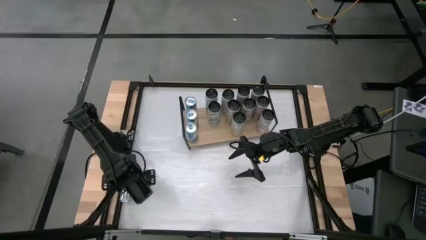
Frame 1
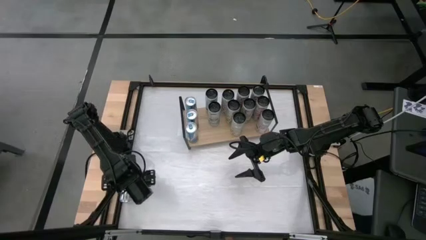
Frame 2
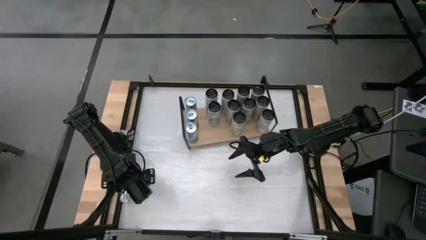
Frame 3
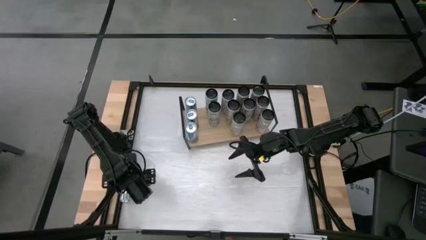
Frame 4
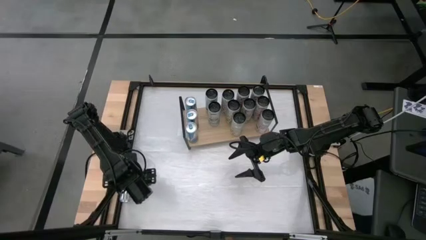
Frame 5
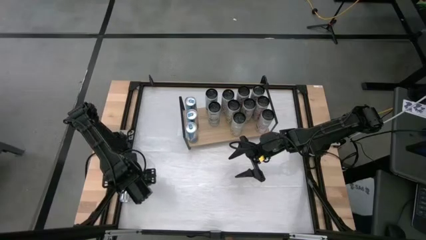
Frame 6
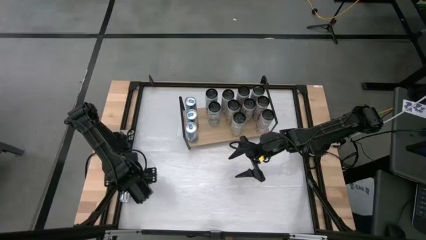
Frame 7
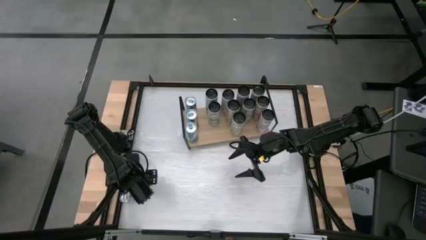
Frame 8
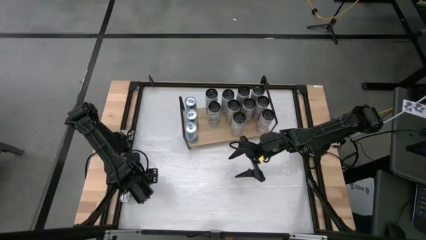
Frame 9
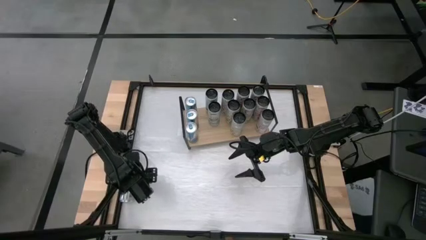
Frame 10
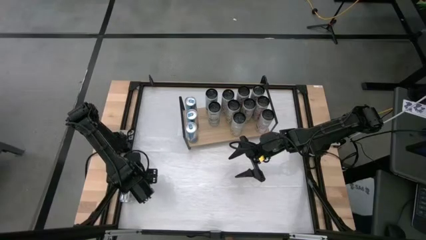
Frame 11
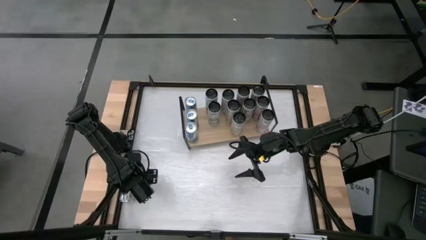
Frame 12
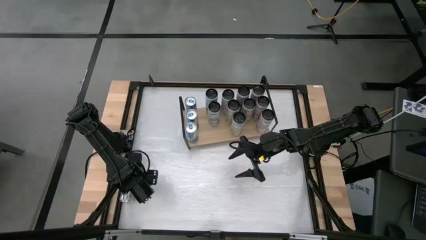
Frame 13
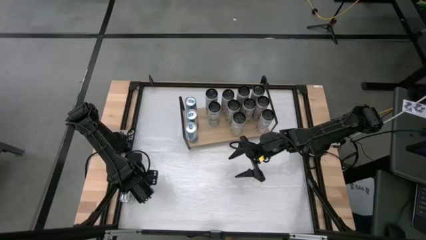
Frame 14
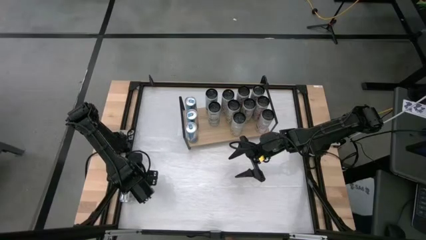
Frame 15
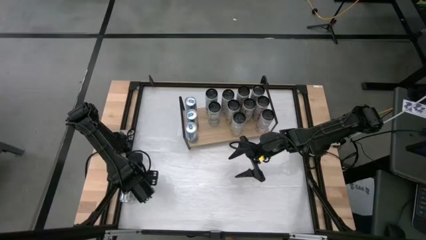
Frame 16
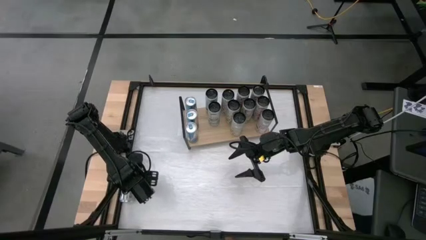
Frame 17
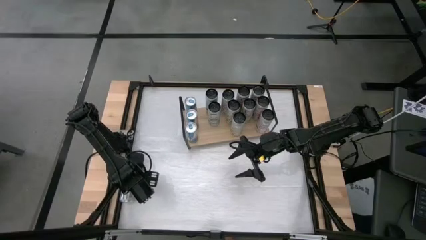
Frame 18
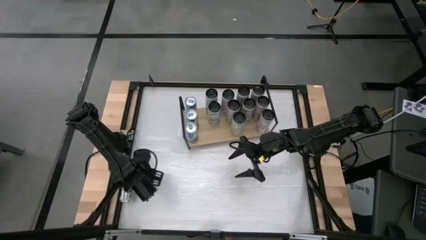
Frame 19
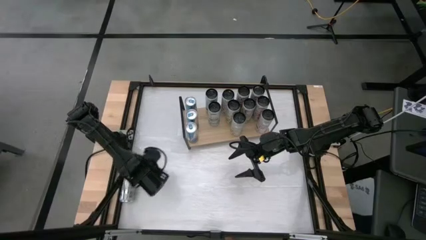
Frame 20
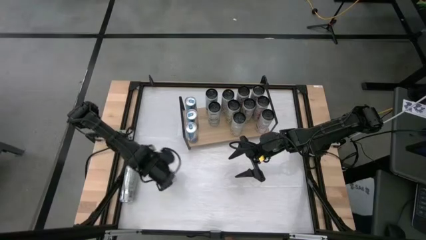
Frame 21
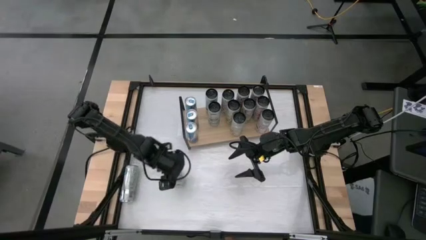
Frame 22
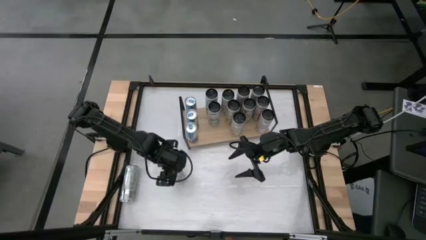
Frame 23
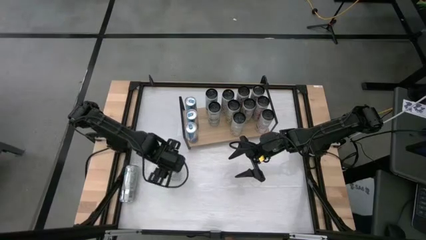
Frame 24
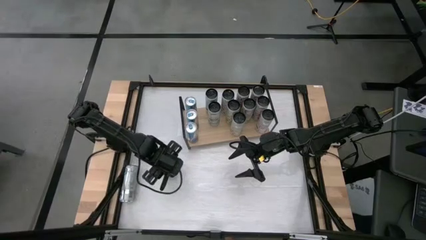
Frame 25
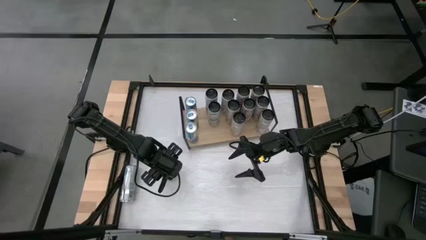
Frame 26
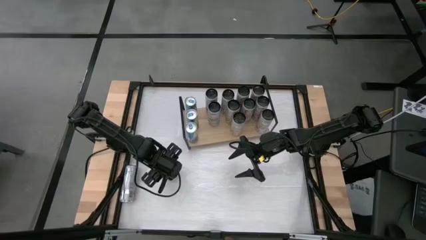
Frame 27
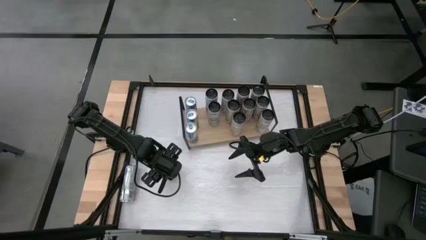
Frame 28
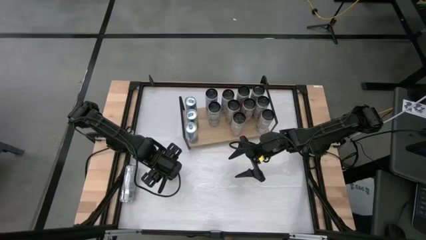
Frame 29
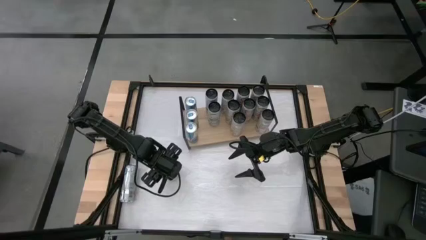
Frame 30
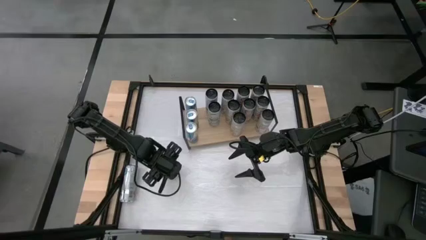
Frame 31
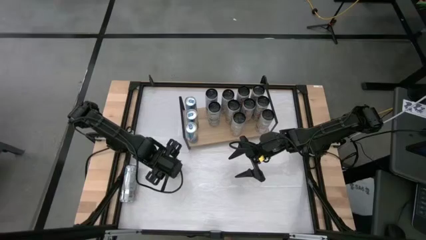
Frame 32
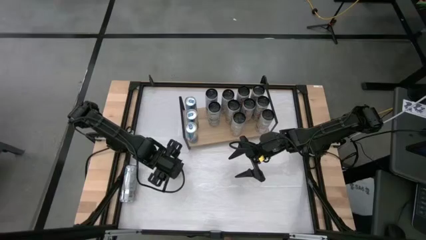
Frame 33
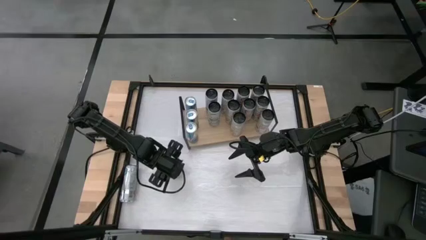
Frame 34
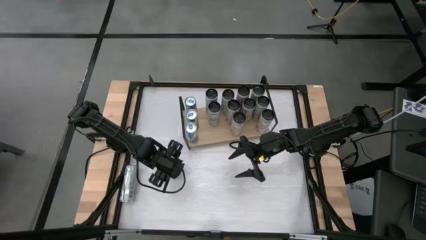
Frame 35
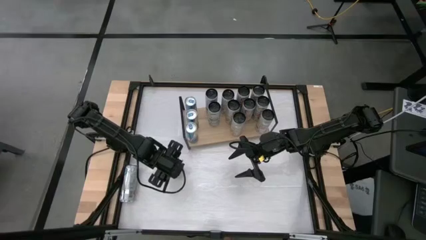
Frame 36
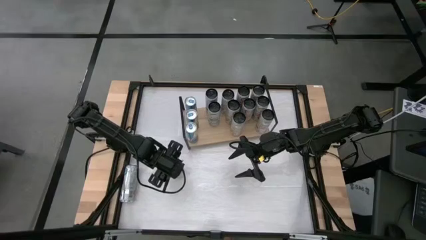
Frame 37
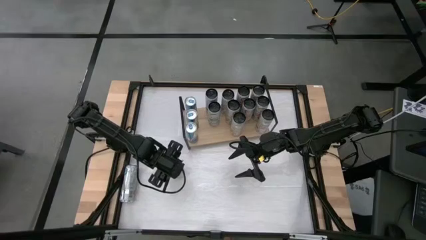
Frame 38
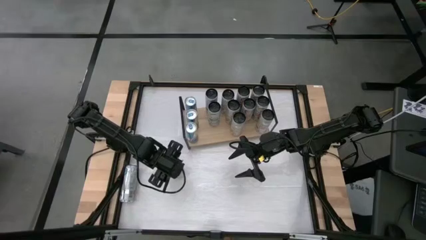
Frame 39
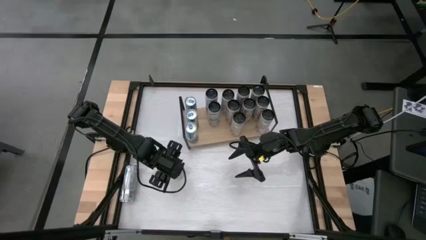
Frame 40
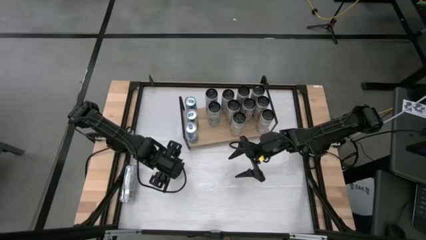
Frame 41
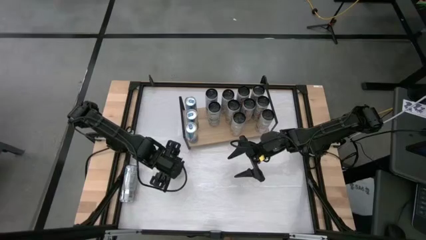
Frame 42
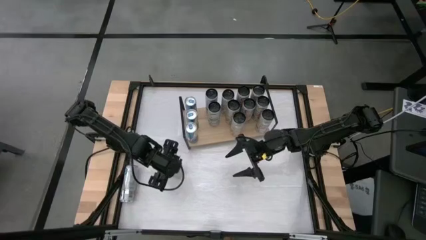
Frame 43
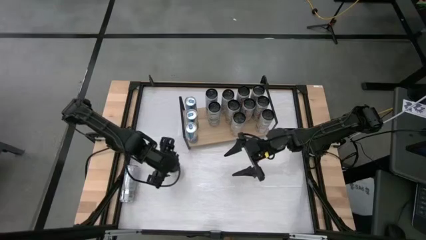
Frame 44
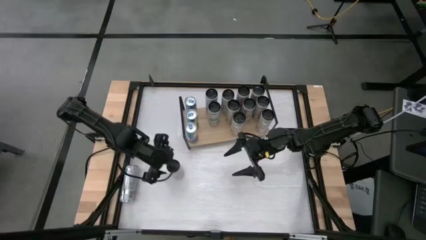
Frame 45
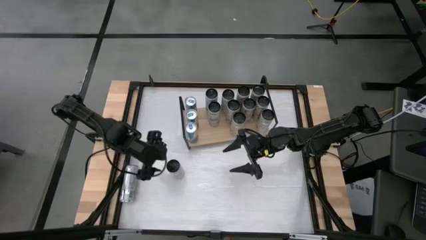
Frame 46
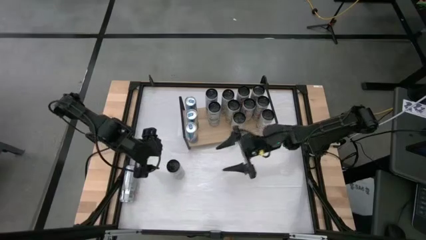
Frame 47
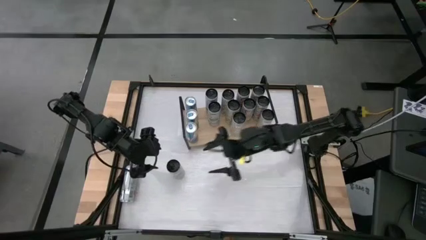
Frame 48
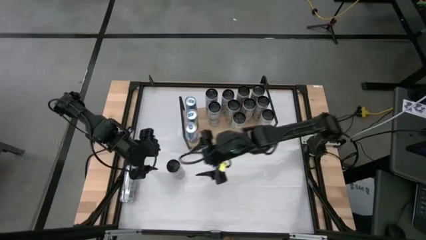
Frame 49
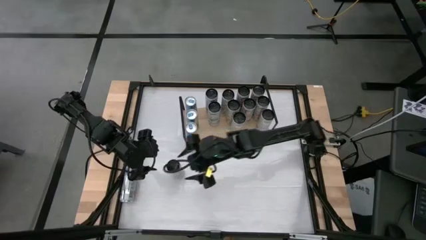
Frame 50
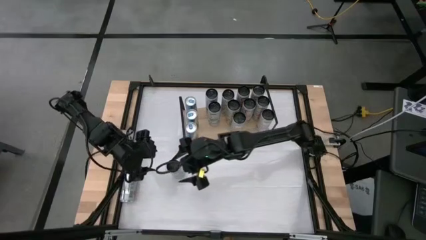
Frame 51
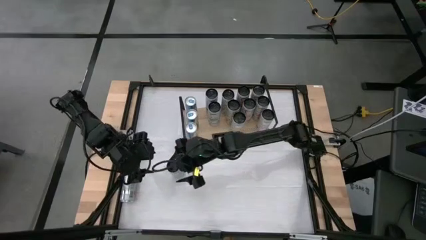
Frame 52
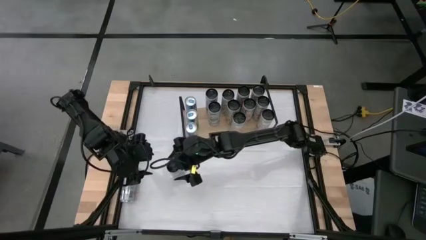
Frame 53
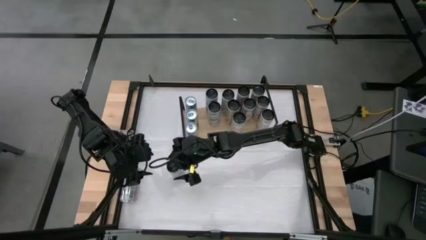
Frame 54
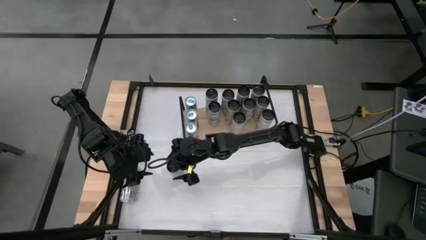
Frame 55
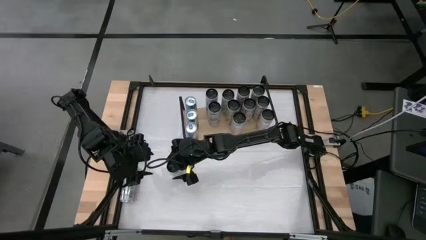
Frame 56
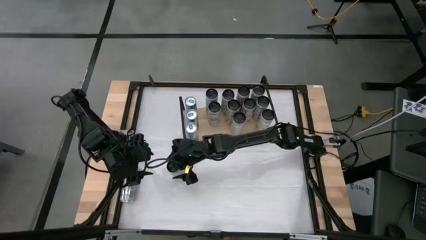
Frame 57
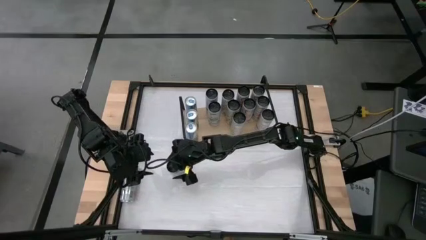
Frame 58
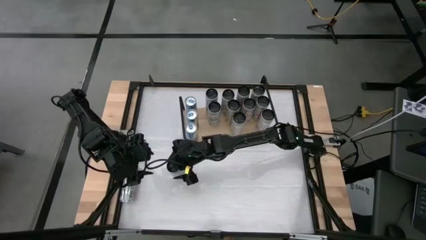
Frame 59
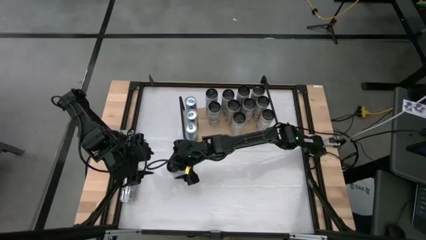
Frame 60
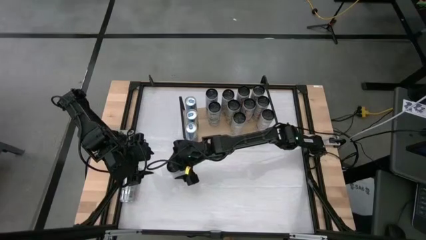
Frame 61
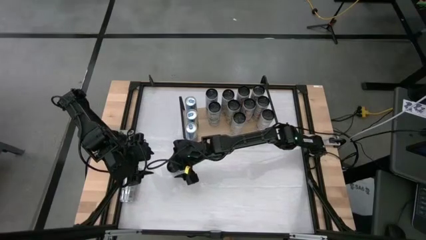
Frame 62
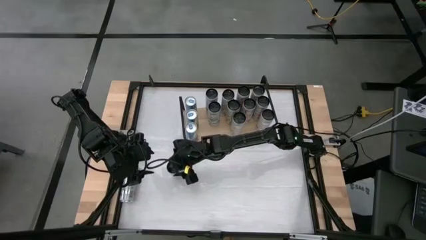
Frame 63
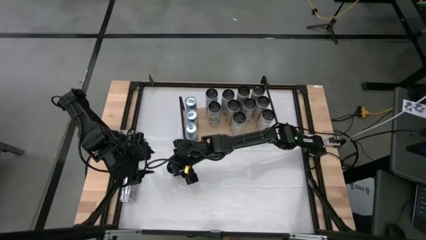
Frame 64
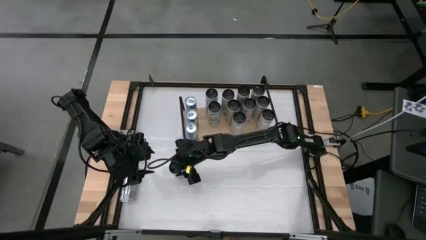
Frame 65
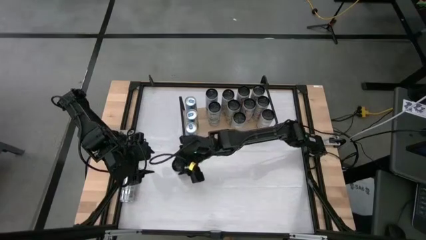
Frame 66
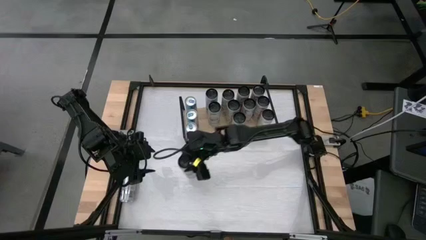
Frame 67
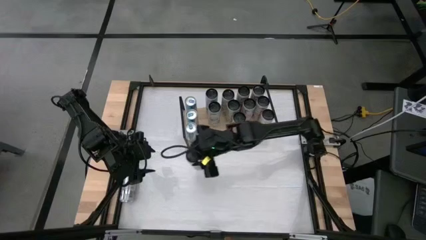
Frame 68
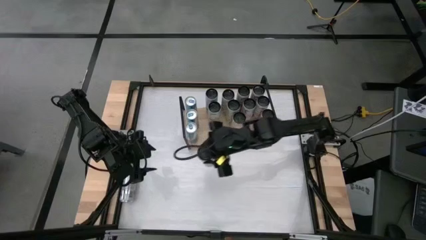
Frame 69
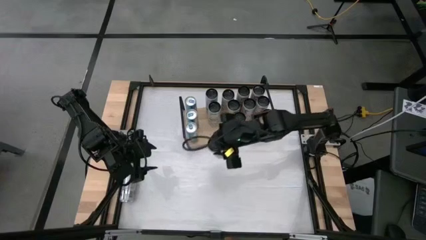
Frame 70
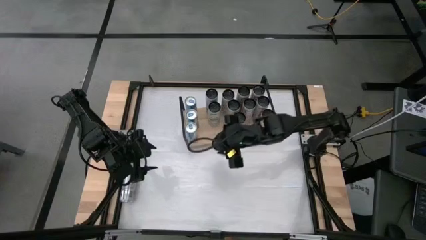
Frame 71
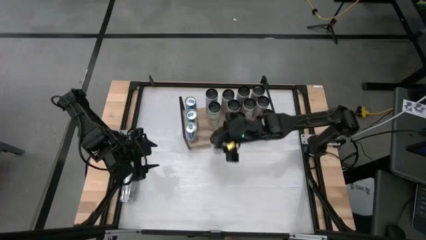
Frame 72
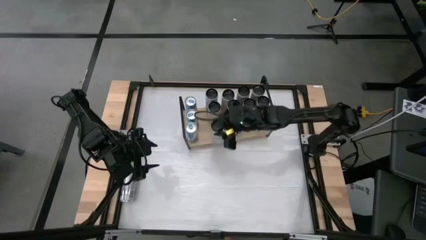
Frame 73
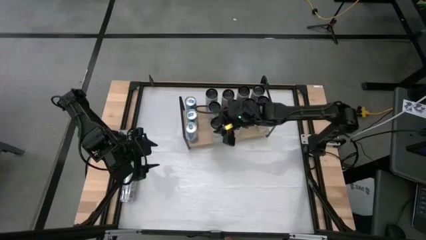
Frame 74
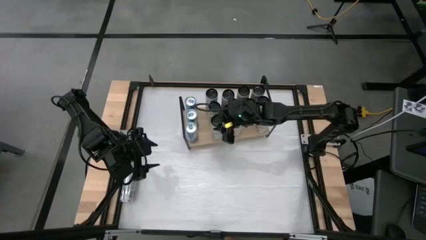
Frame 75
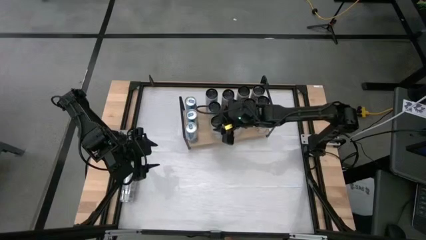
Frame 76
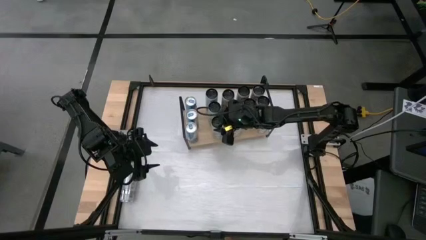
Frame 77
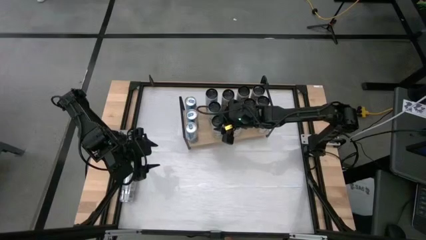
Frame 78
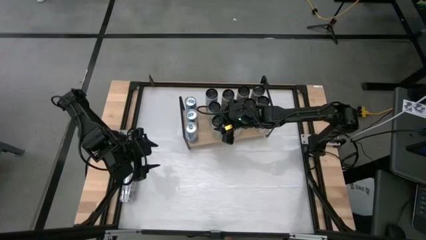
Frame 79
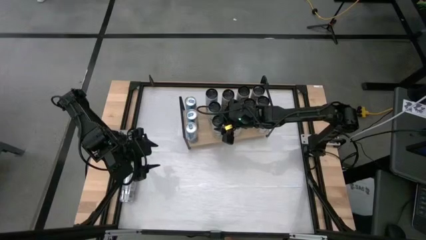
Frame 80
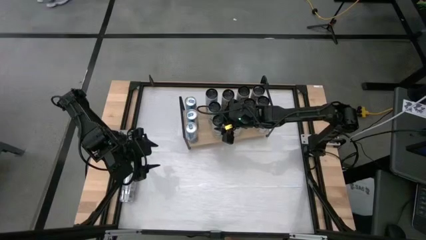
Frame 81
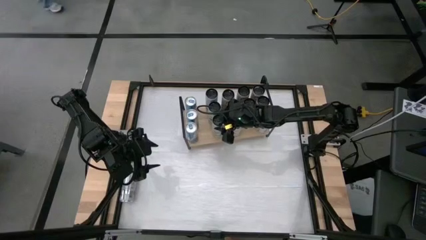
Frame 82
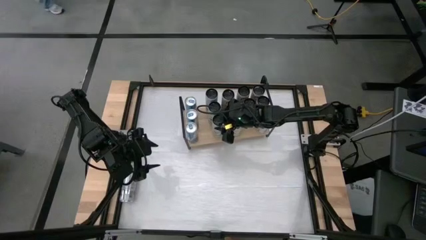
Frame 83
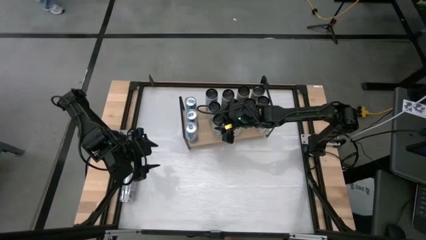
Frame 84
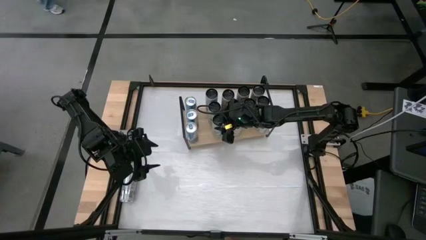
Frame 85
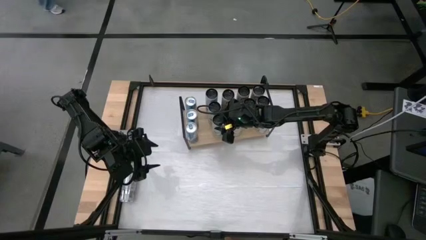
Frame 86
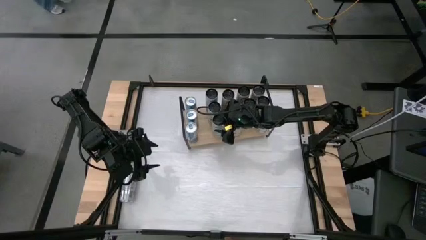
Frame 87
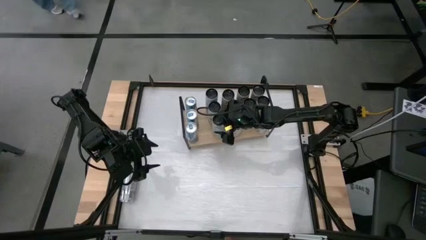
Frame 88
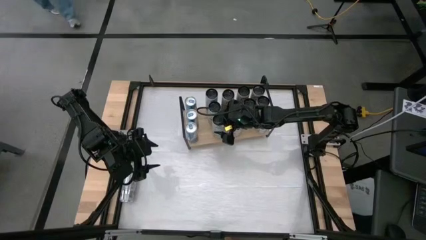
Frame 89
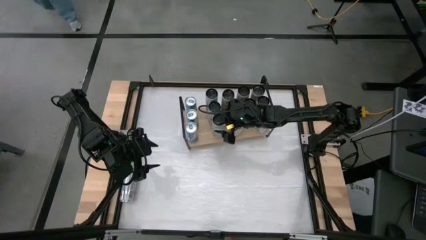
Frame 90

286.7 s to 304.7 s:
Task: Place canned beverage on shelf
Put the white-blue soda can on the shelf aligned with the other white-blue soda can
